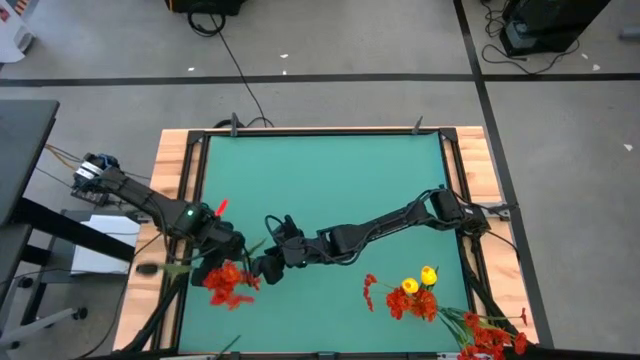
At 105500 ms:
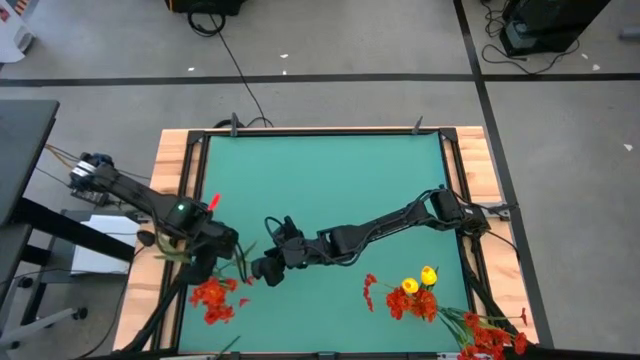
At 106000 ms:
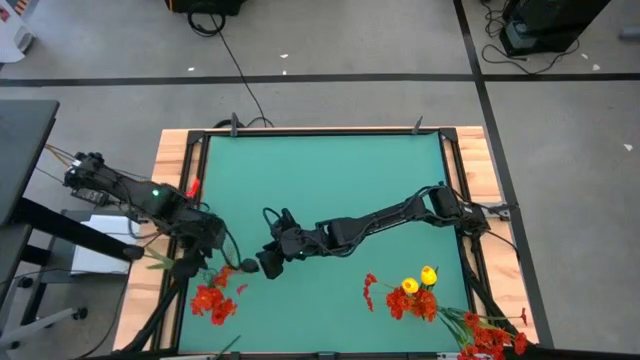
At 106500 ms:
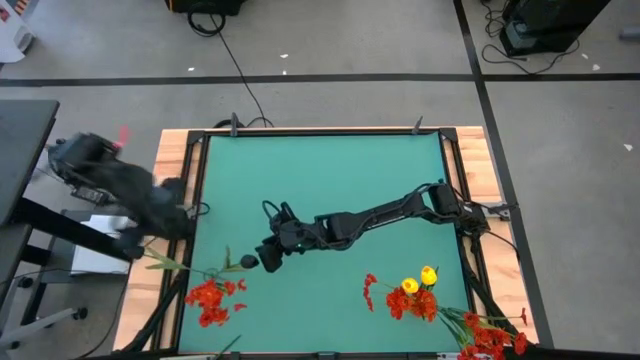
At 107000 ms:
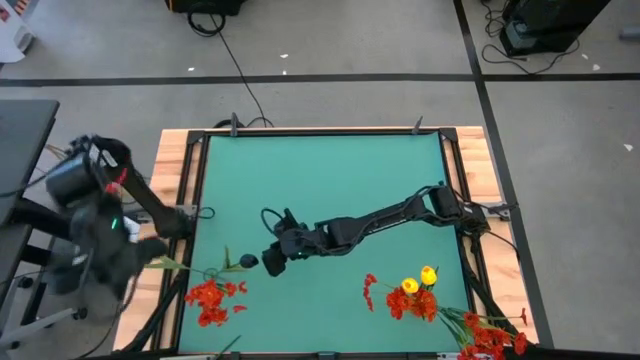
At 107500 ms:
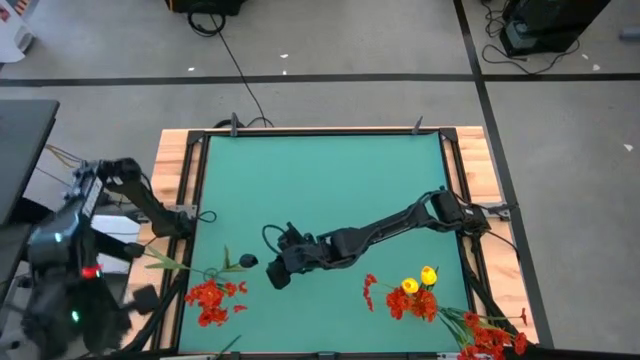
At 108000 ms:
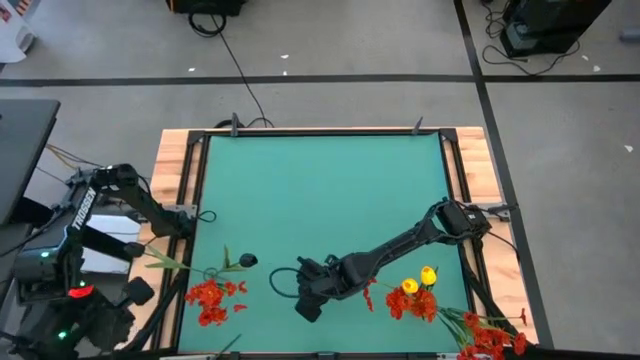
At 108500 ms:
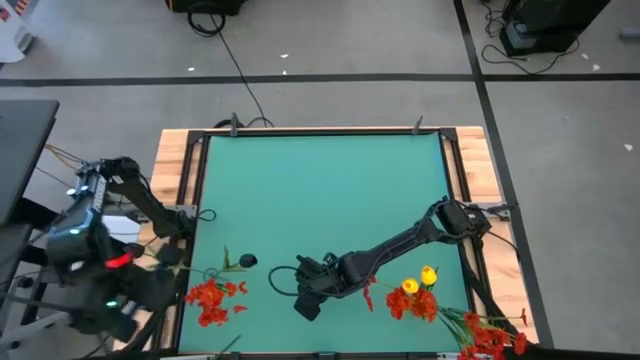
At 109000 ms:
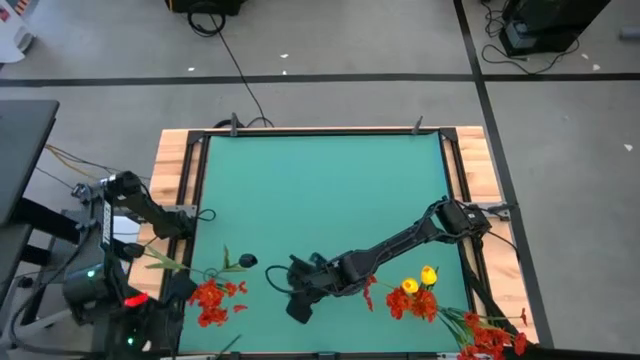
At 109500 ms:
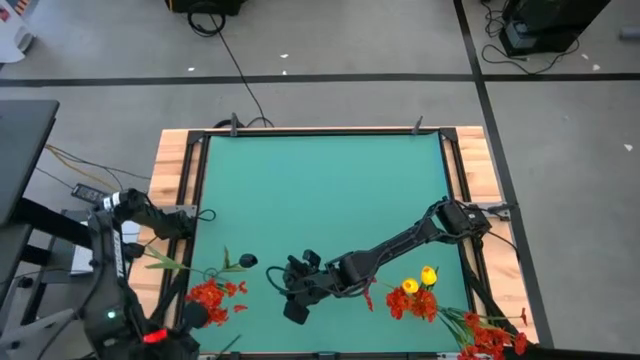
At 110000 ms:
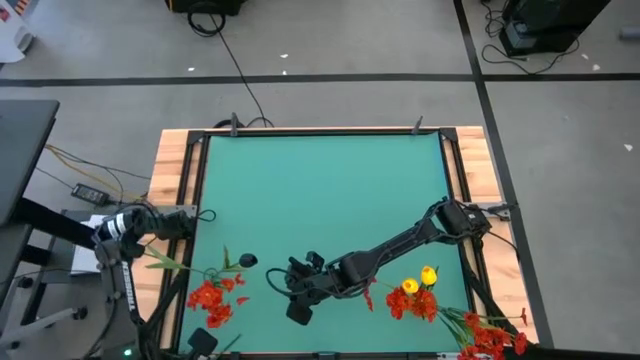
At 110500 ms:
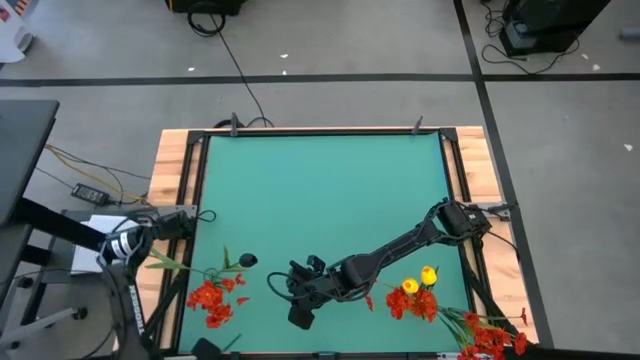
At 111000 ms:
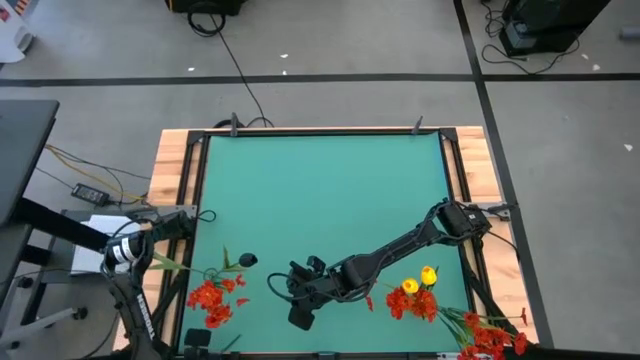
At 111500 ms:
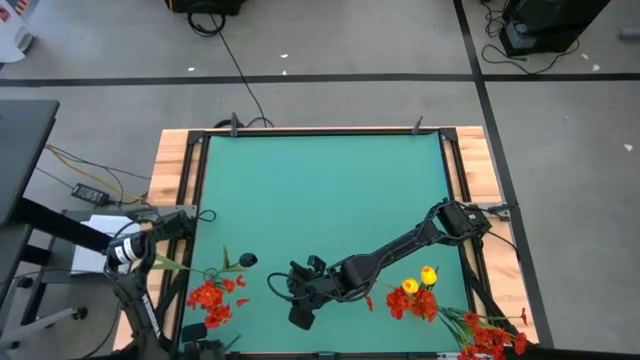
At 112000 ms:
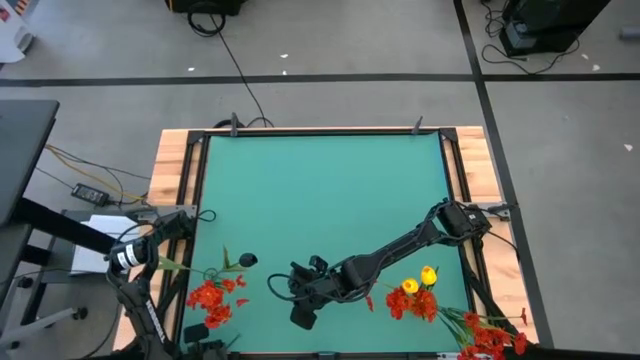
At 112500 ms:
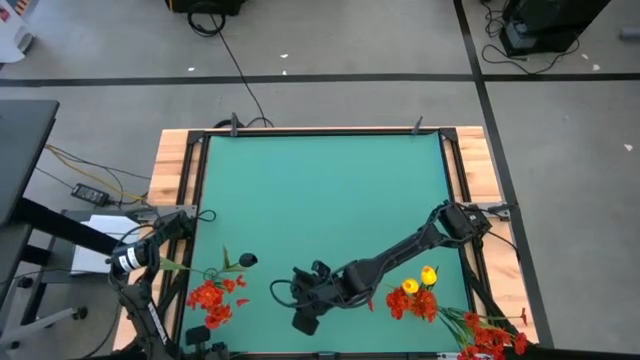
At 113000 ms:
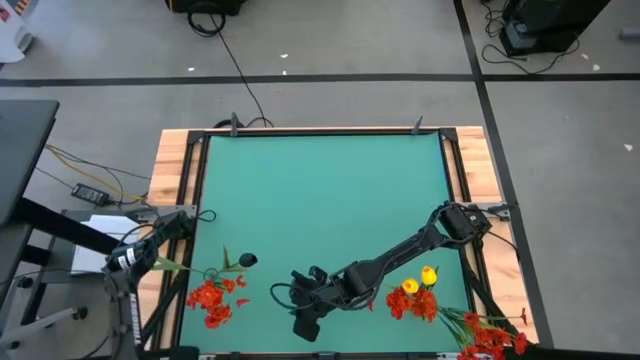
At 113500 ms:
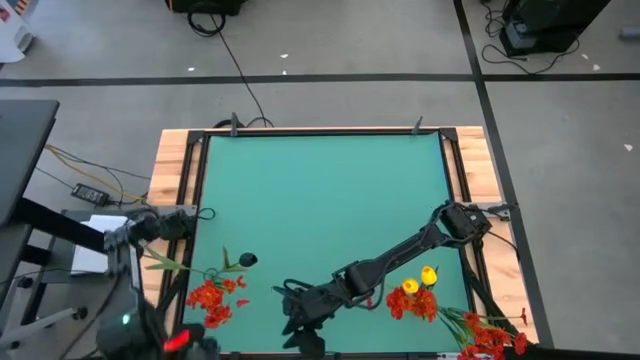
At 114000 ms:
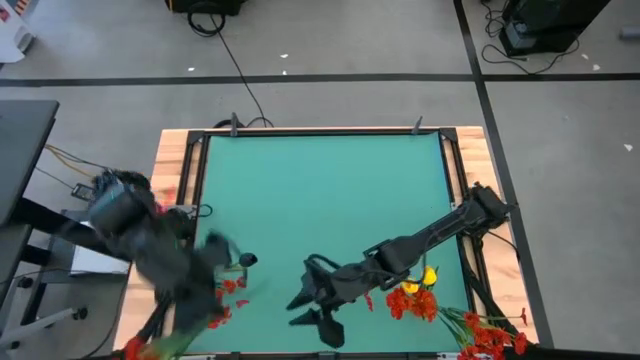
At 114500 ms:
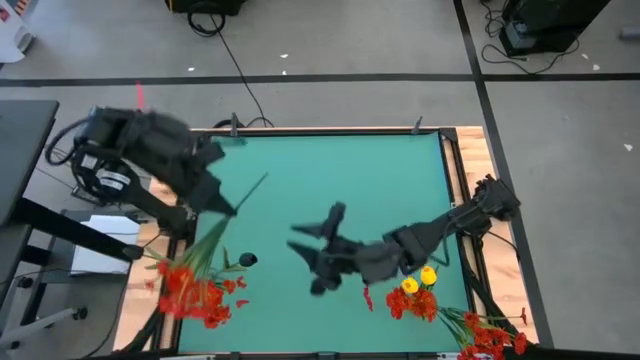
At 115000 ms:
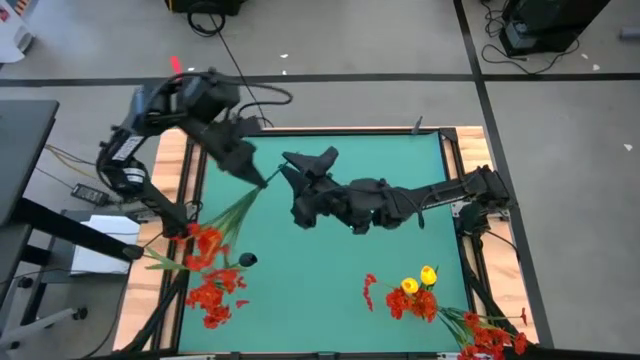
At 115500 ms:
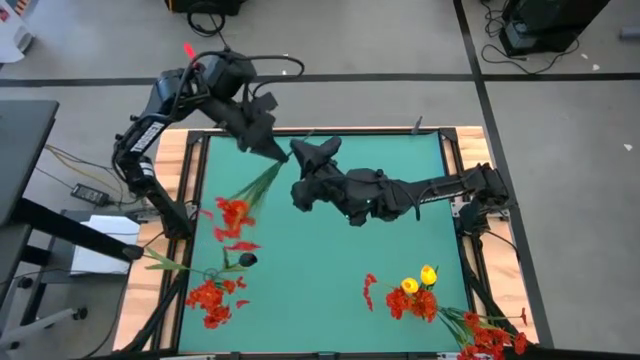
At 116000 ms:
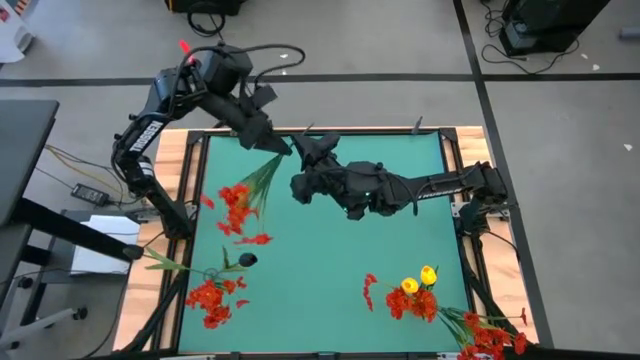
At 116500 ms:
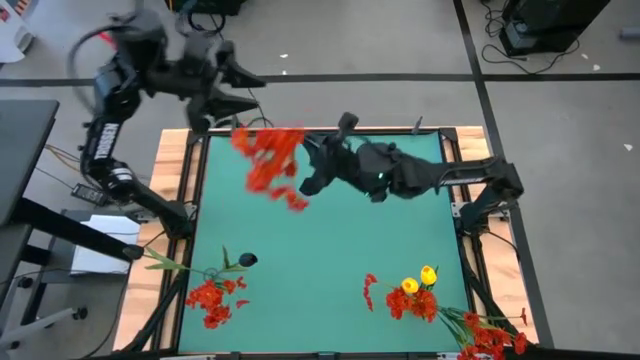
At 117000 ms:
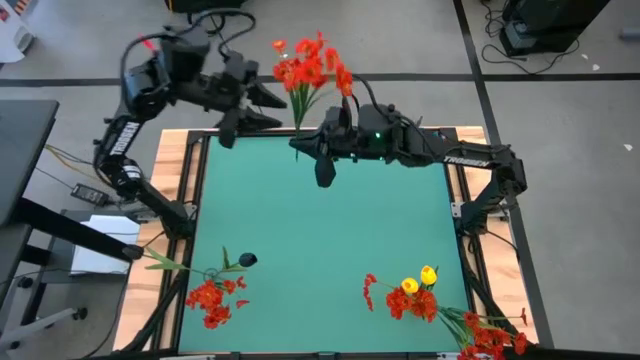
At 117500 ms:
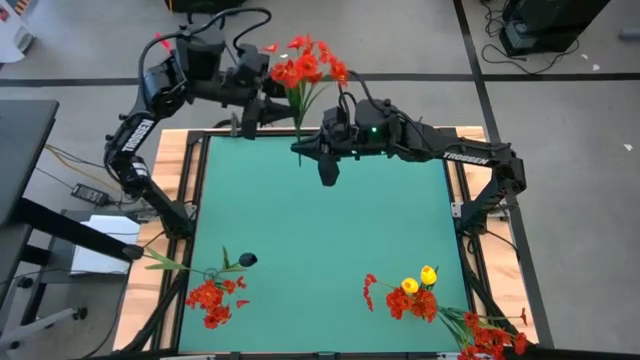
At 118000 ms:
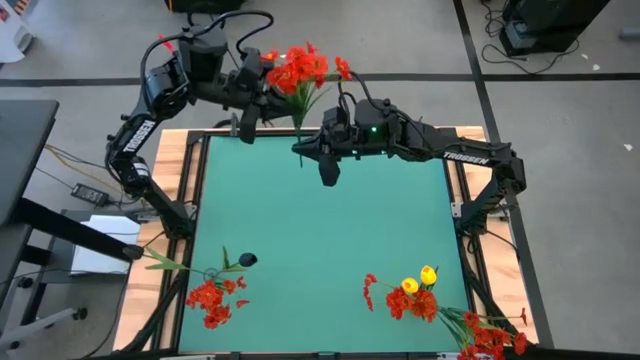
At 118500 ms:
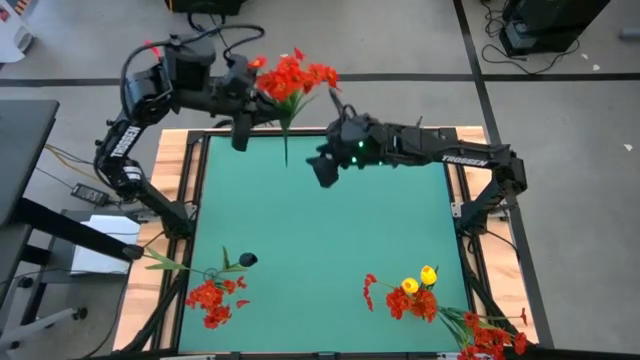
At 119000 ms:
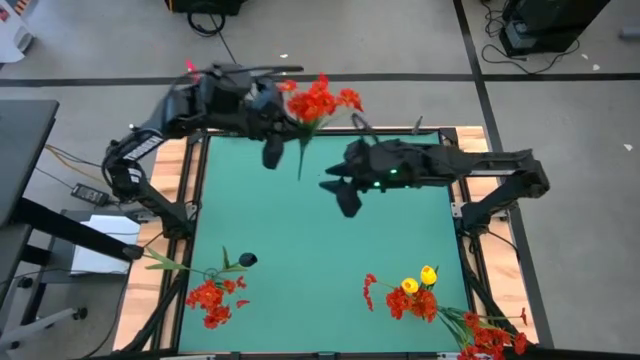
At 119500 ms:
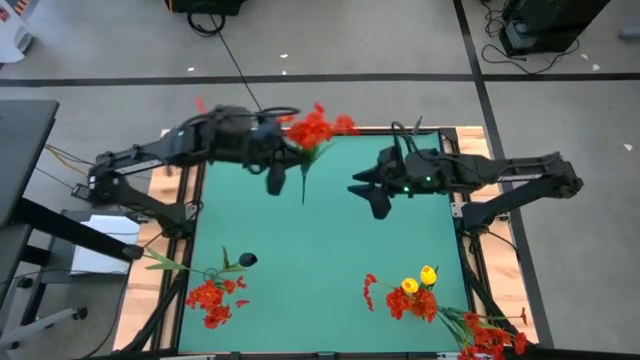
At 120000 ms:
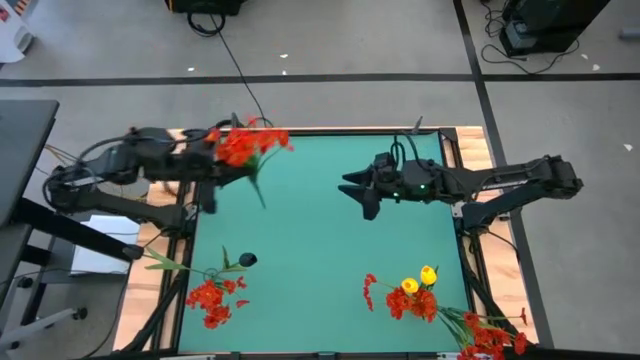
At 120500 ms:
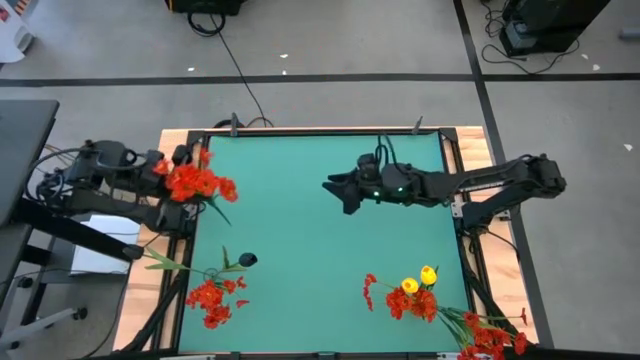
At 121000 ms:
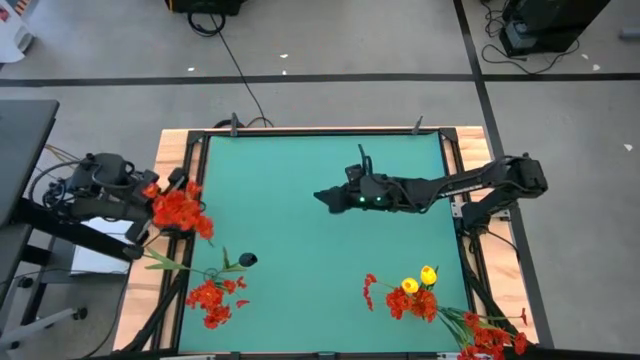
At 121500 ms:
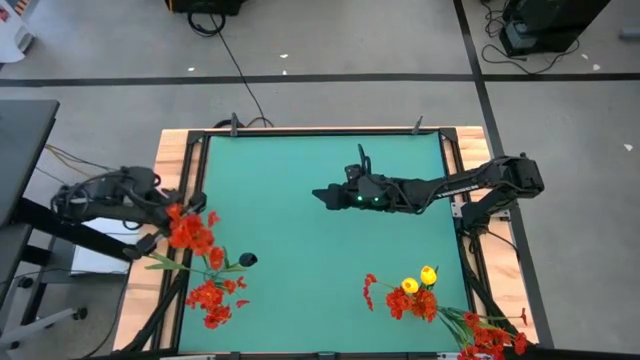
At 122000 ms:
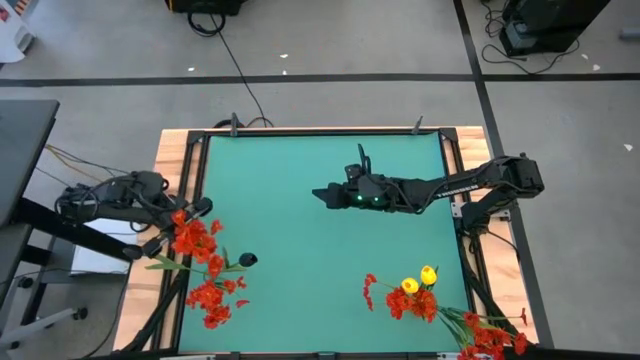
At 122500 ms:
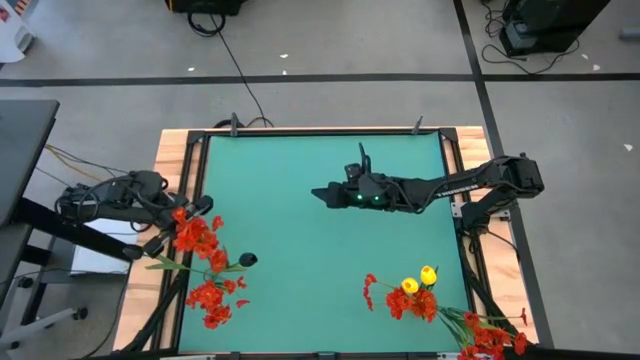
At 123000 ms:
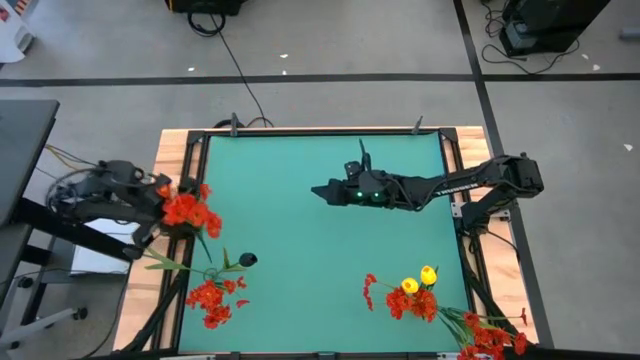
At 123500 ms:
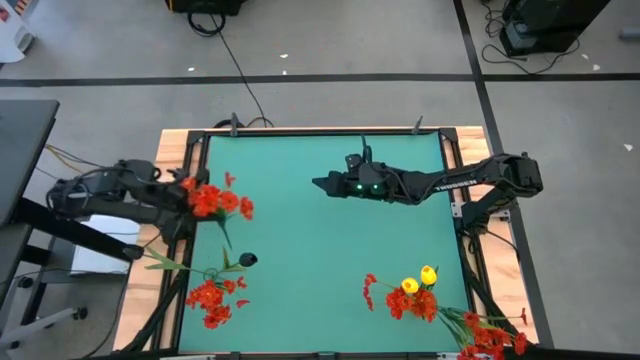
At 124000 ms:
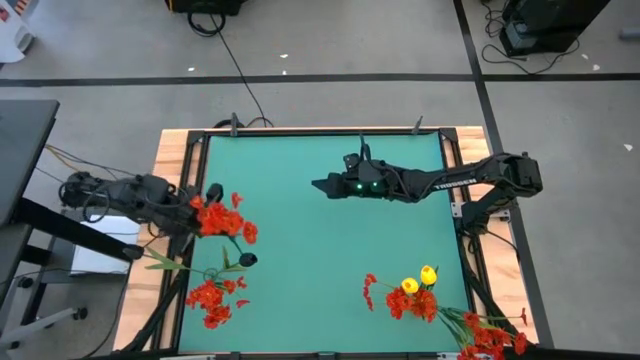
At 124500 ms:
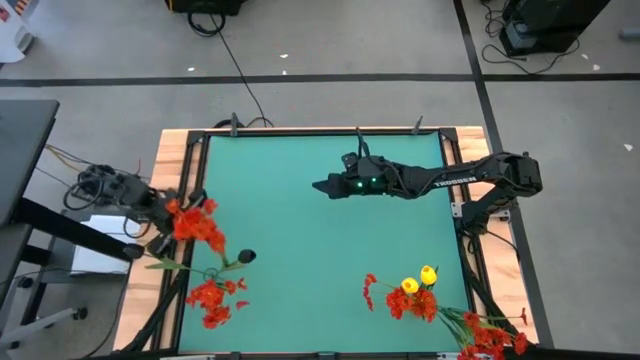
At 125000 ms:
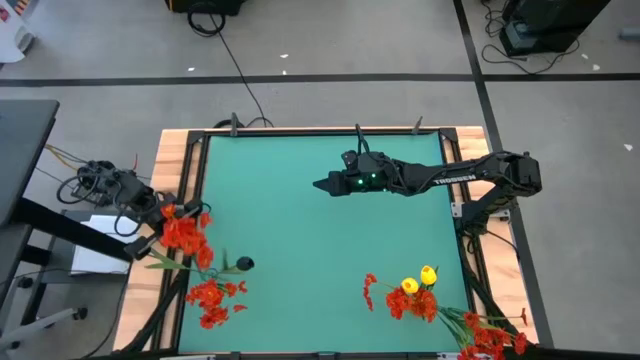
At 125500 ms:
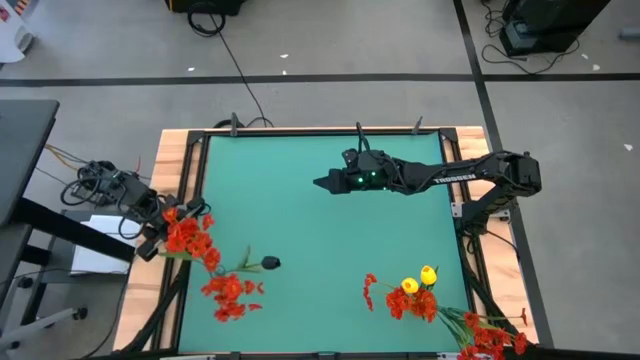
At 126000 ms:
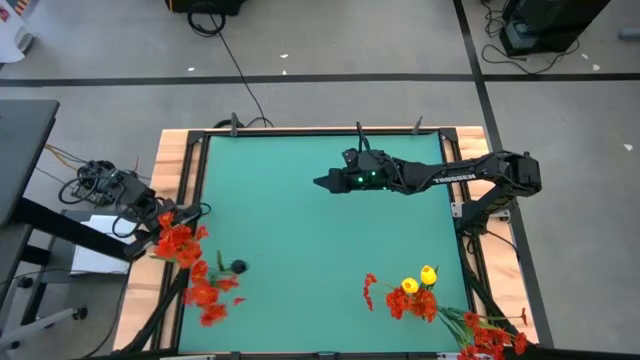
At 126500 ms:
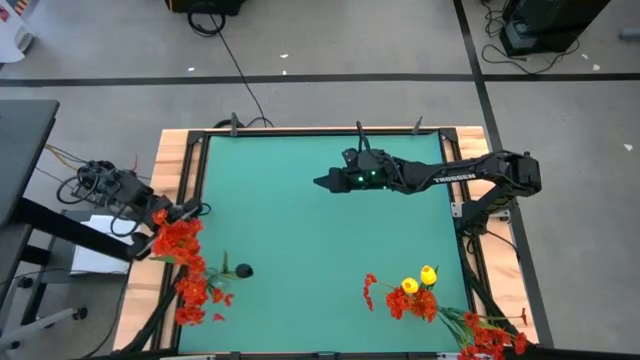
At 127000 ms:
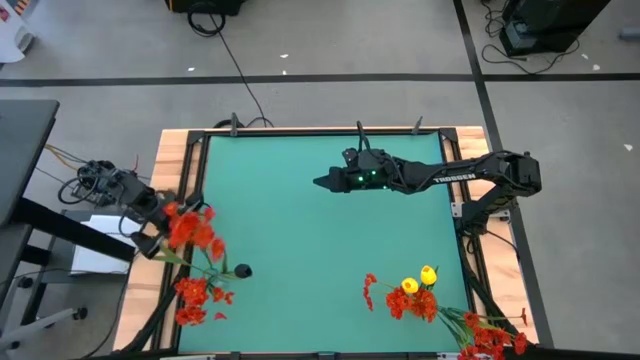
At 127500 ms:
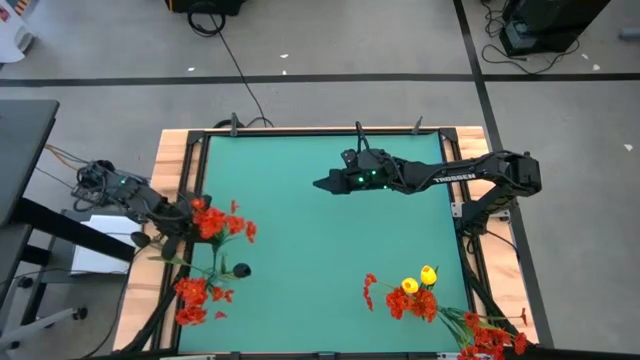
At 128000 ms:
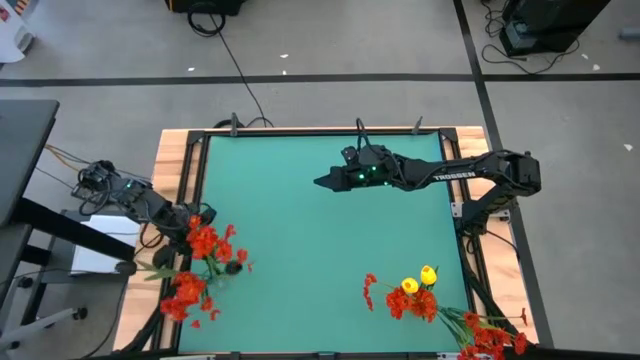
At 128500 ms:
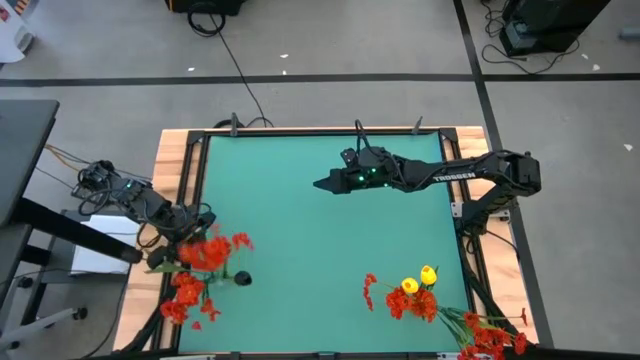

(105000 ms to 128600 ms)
Task: Sort flowers into vase by color
Put the red flowers into the transparent flower vase
